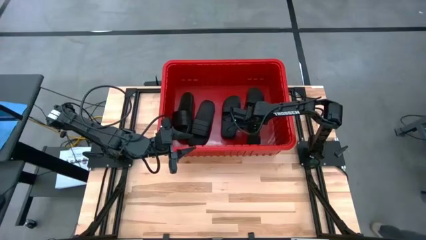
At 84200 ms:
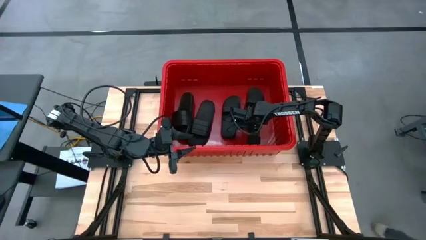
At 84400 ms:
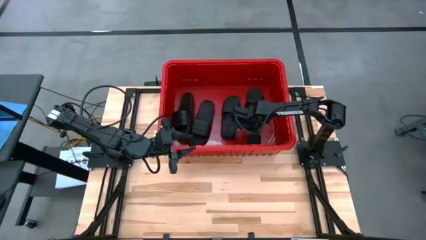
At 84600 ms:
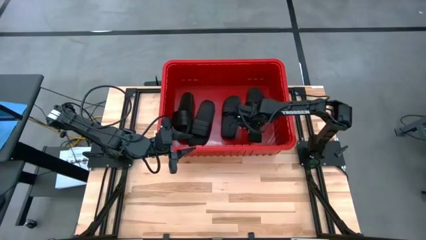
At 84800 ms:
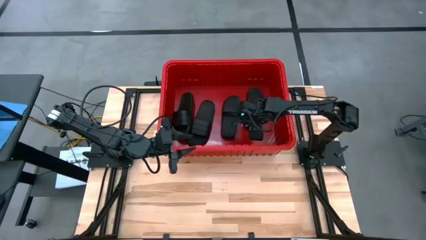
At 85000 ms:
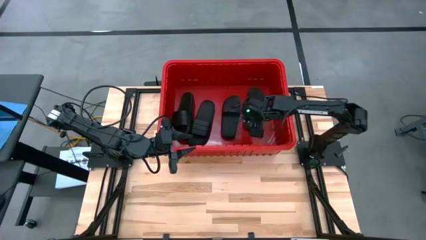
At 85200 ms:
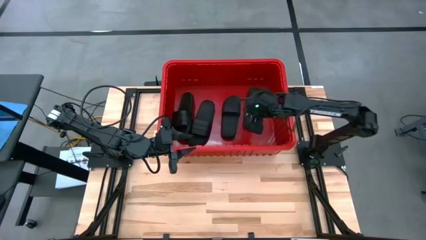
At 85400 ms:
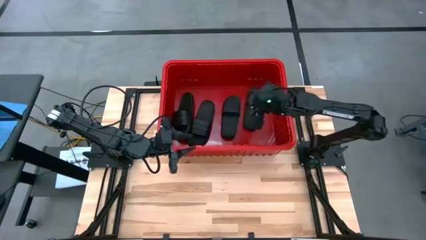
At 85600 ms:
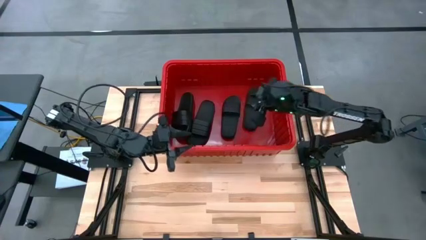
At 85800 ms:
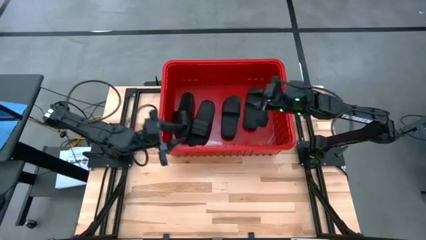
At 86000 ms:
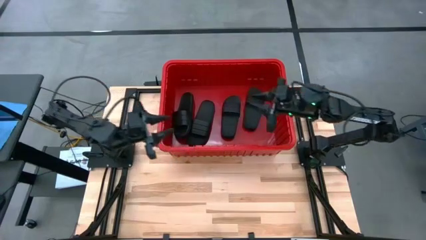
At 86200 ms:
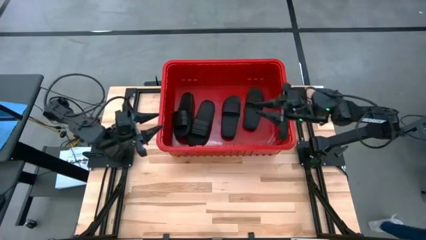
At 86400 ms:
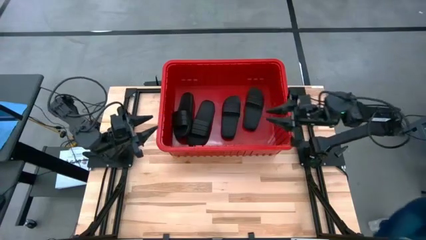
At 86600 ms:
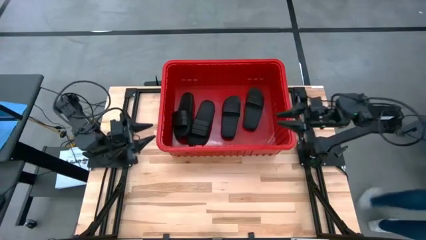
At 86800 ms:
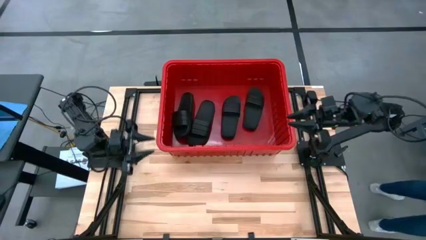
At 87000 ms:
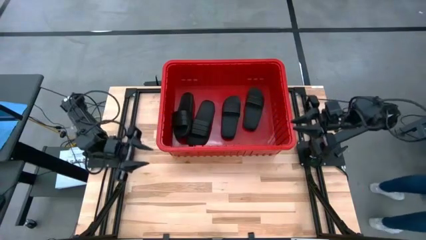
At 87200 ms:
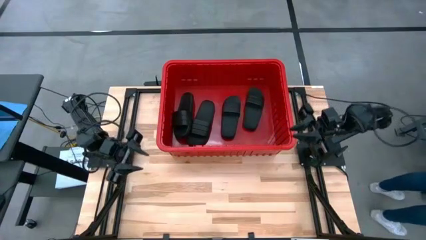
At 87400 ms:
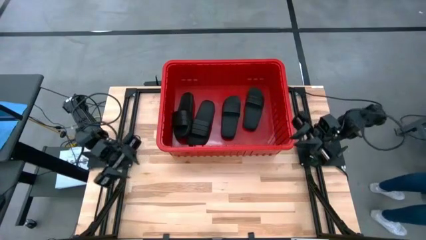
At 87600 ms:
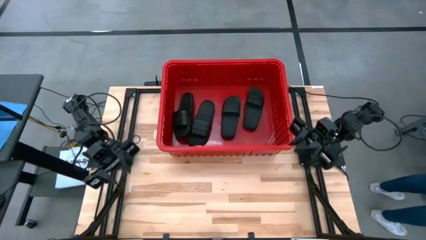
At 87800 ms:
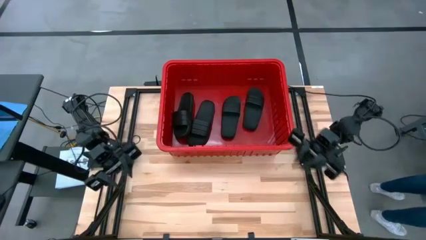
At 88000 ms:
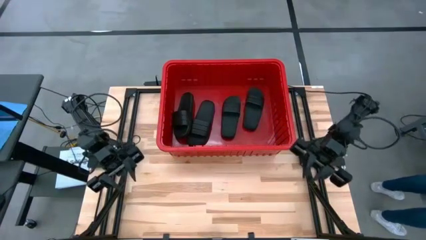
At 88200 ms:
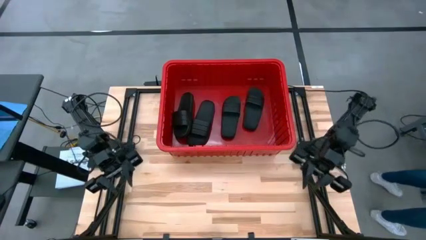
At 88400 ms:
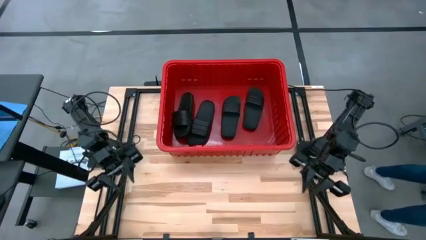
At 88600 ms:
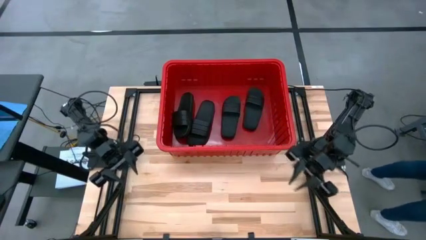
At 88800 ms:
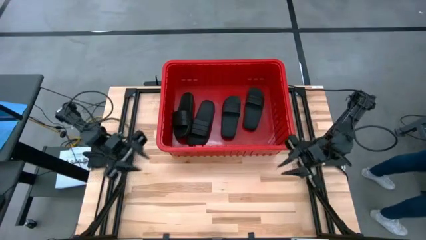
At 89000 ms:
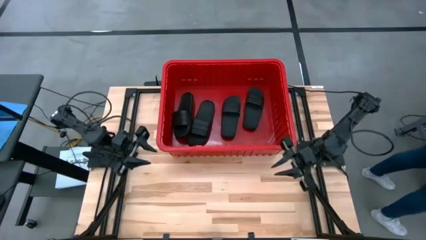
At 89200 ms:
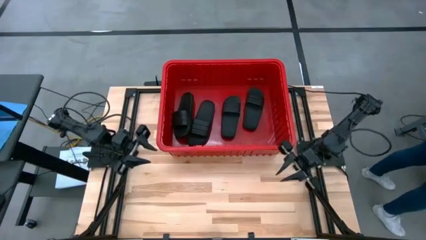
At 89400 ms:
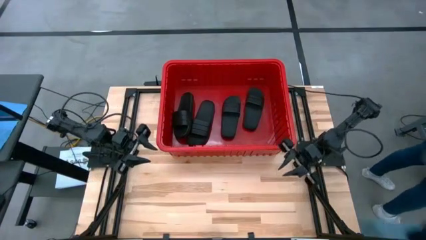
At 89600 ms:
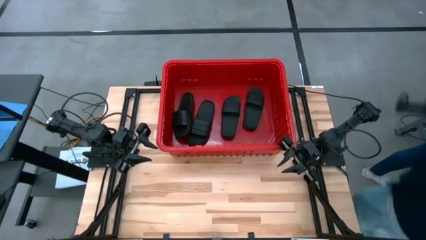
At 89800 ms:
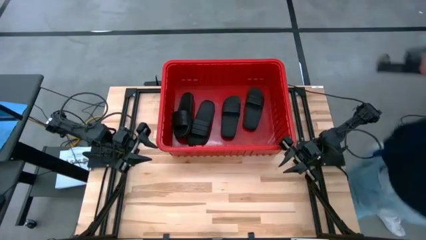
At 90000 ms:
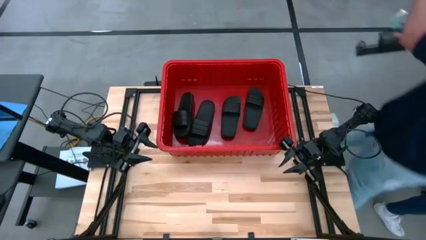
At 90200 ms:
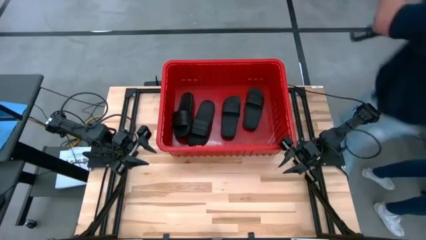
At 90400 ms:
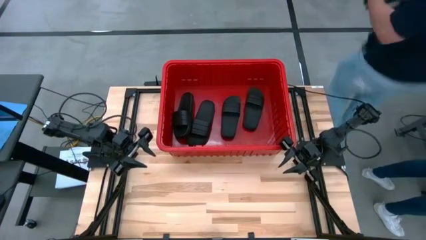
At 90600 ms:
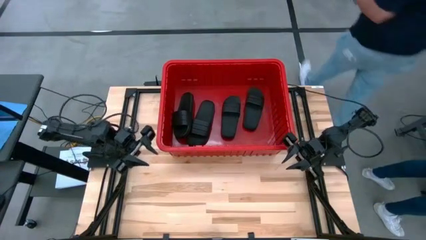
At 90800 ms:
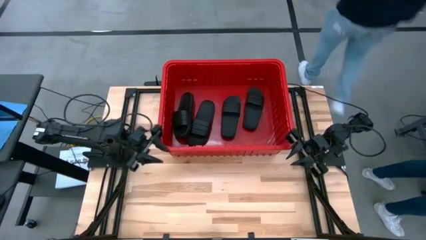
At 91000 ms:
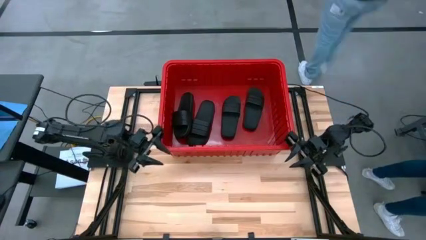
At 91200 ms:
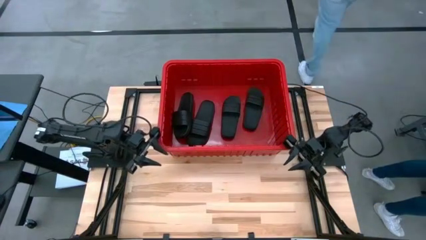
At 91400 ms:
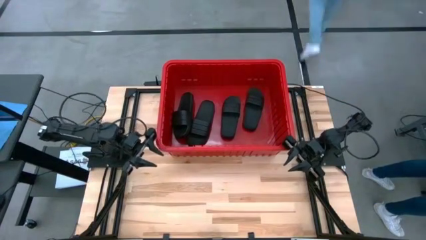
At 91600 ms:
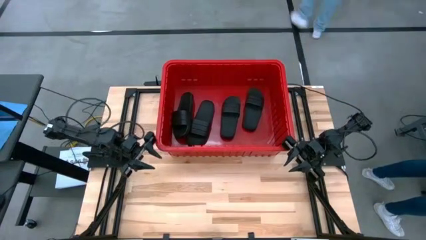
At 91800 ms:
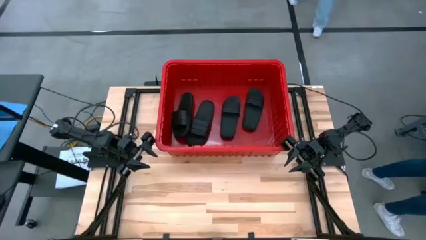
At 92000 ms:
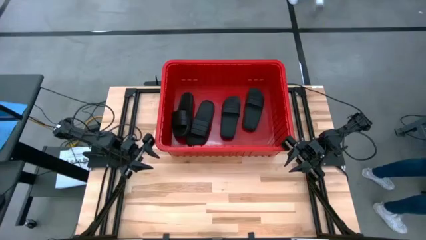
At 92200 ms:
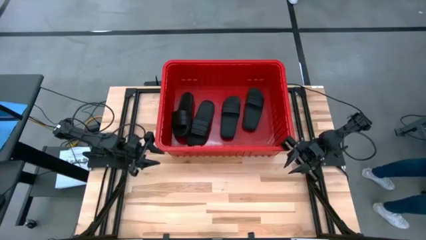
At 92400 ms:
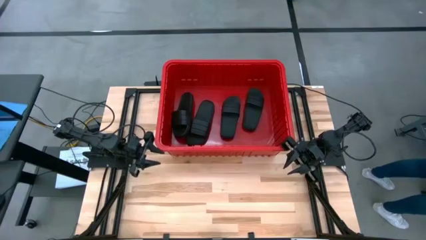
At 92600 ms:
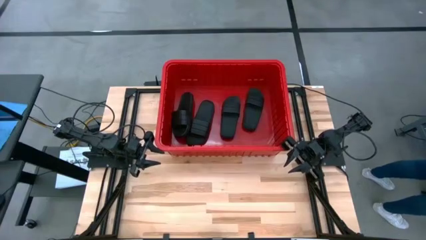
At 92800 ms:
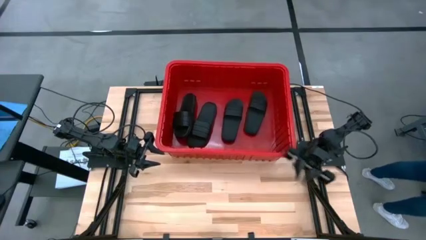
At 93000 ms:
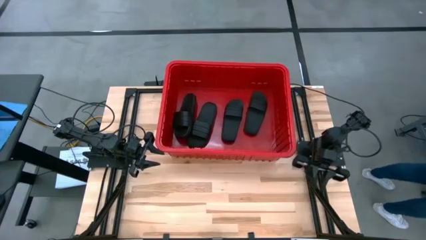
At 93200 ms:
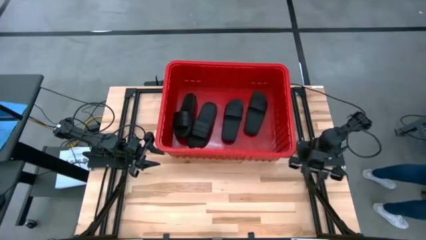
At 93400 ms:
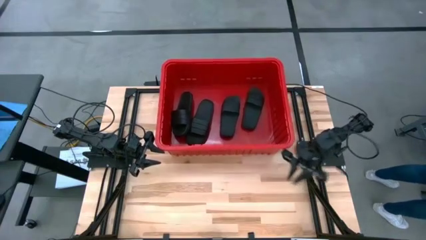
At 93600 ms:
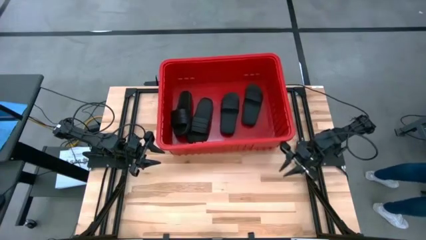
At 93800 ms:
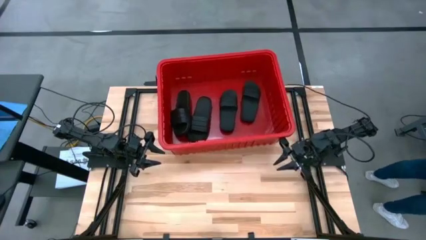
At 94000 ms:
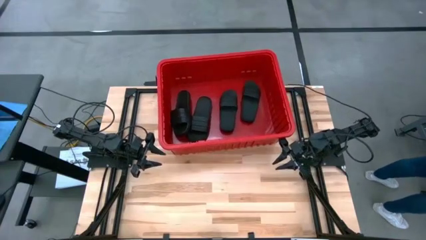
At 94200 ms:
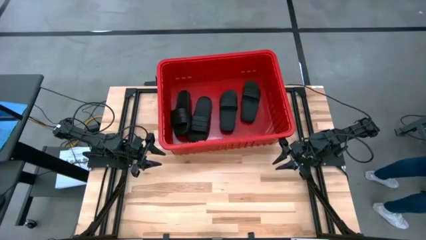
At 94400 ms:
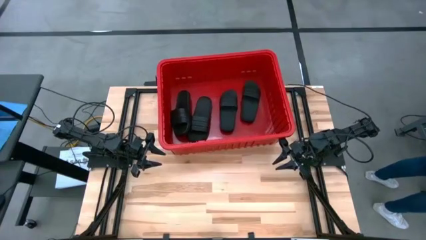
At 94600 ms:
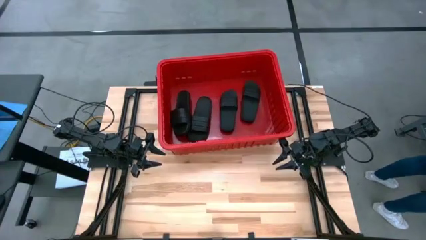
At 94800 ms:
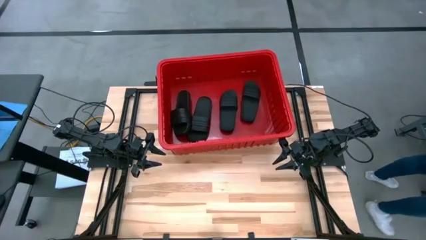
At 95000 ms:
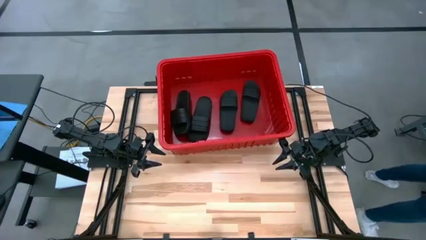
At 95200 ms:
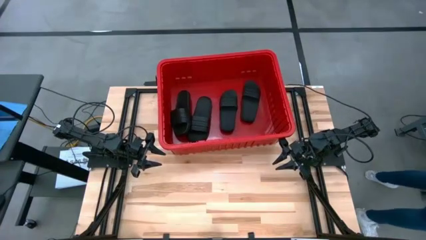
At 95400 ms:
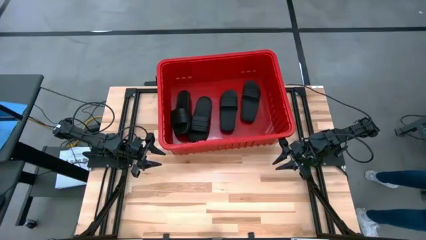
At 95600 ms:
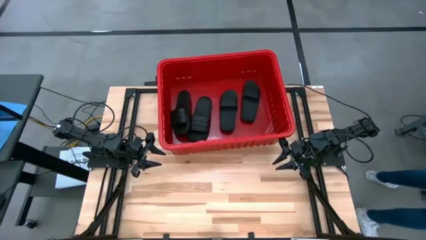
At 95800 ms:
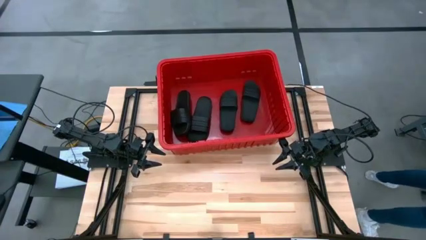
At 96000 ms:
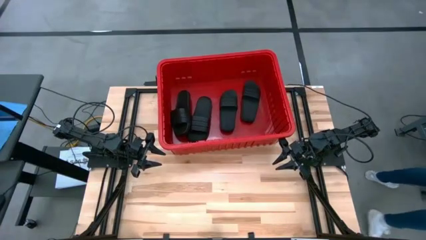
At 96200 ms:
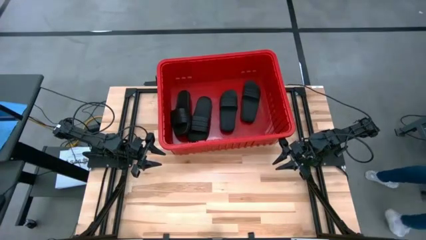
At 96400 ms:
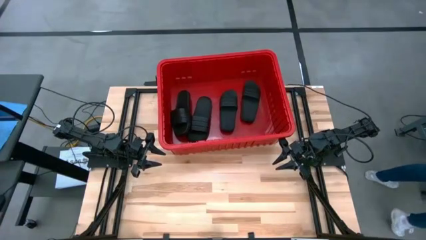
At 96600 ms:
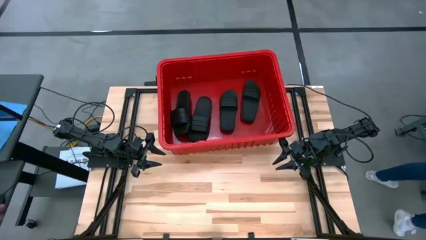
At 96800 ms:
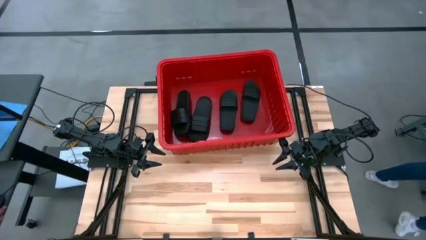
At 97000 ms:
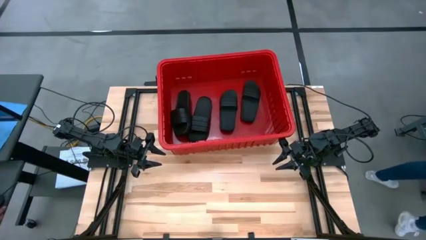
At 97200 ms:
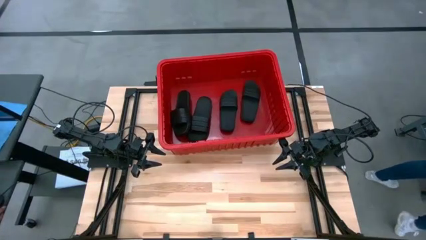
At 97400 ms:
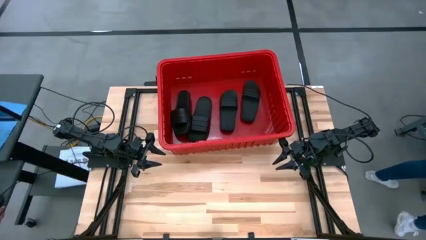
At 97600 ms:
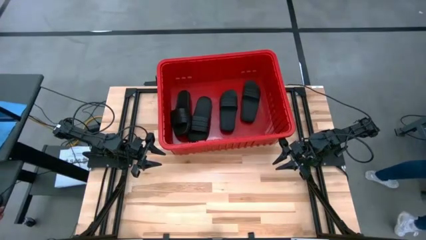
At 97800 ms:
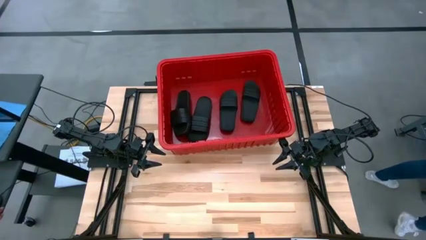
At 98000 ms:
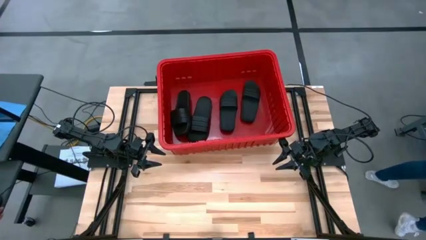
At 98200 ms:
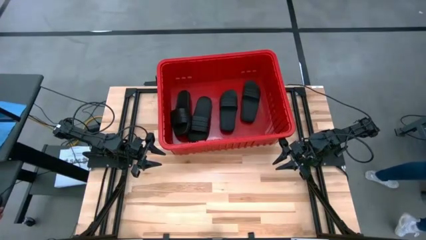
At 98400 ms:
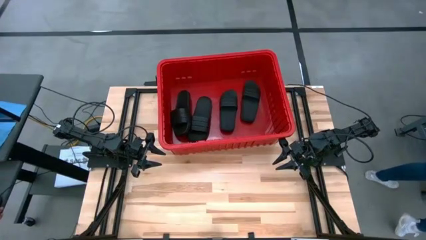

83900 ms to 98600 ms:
Task: Pick and place slides into bin
Return to Home Position
